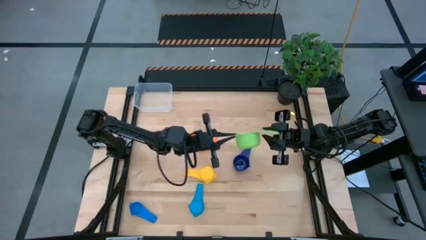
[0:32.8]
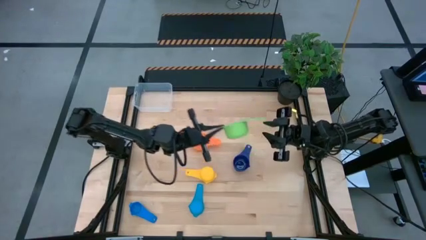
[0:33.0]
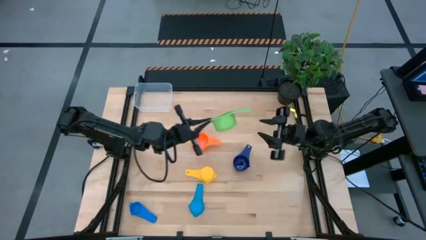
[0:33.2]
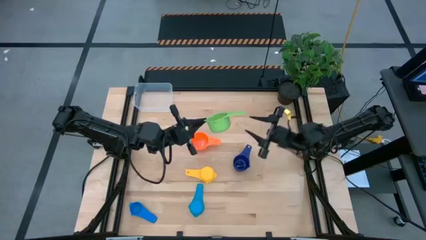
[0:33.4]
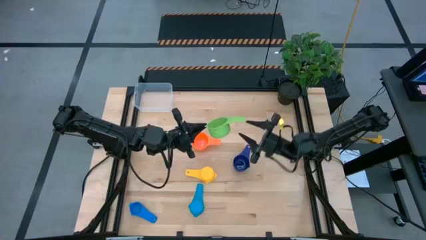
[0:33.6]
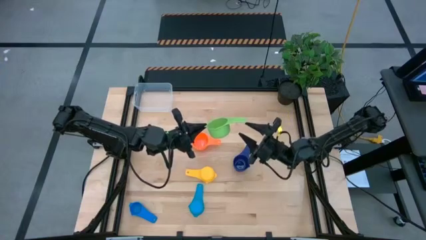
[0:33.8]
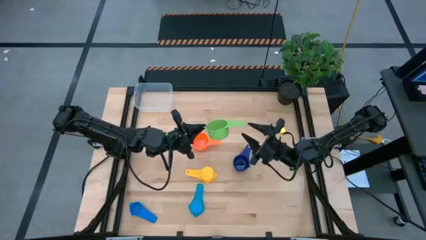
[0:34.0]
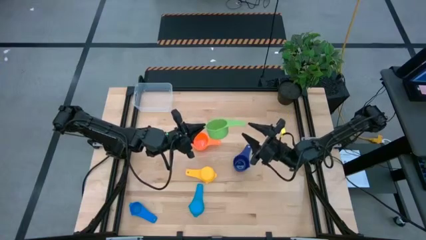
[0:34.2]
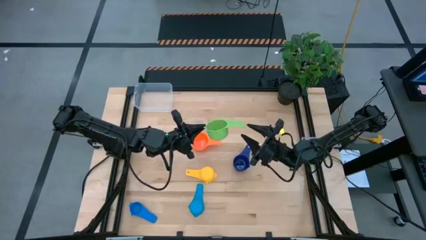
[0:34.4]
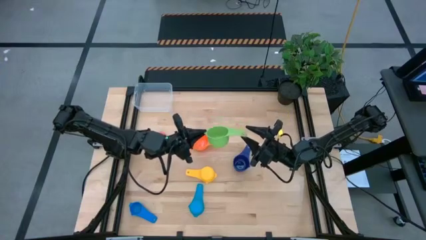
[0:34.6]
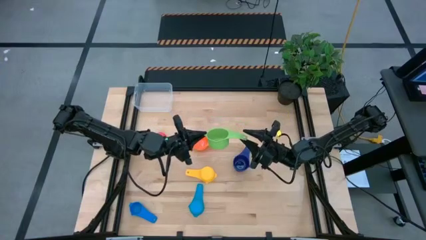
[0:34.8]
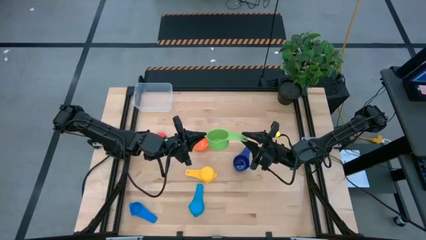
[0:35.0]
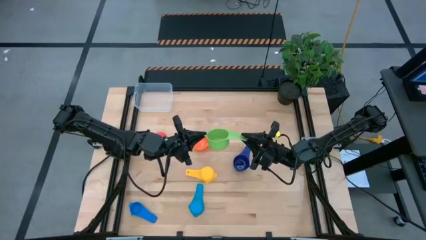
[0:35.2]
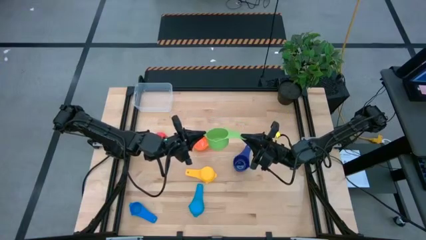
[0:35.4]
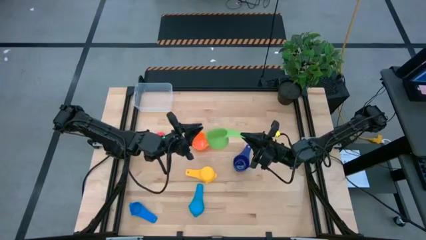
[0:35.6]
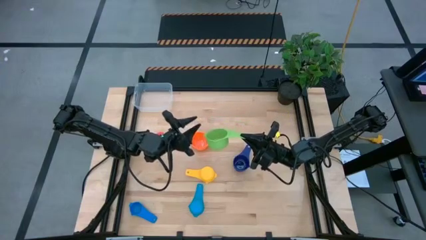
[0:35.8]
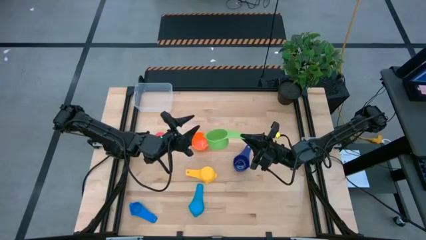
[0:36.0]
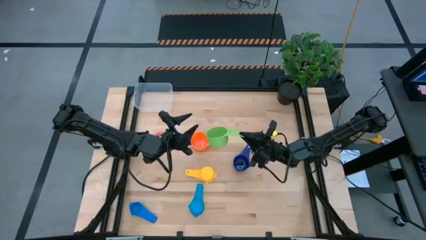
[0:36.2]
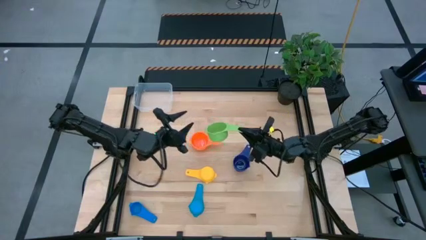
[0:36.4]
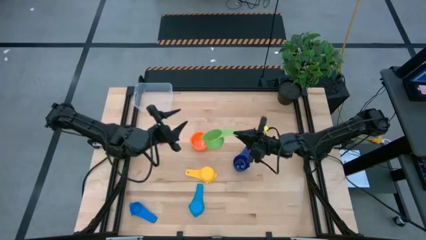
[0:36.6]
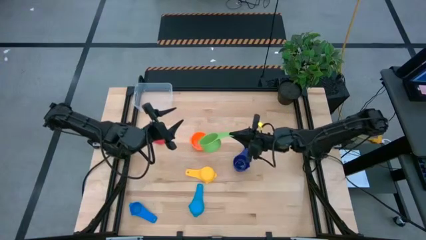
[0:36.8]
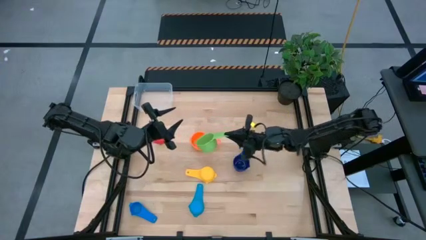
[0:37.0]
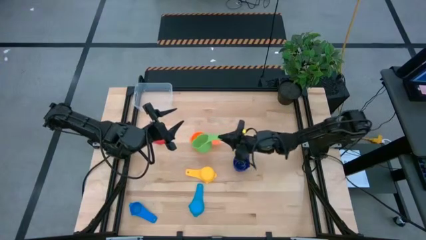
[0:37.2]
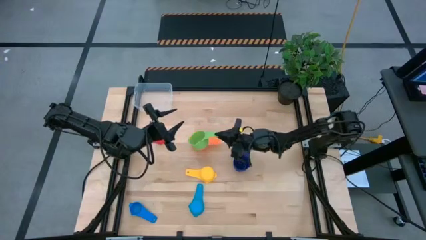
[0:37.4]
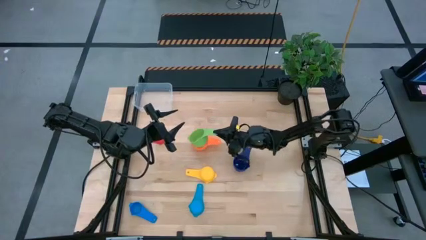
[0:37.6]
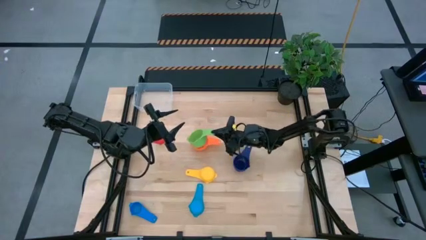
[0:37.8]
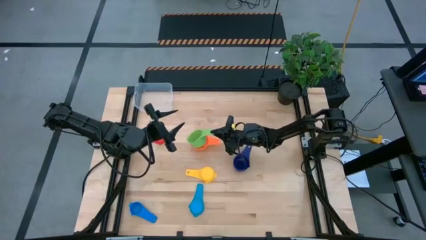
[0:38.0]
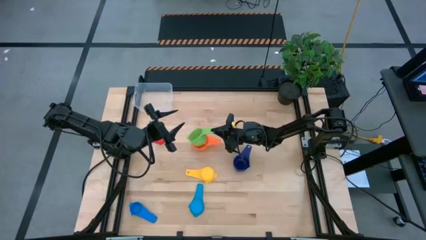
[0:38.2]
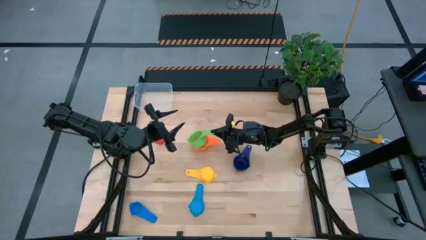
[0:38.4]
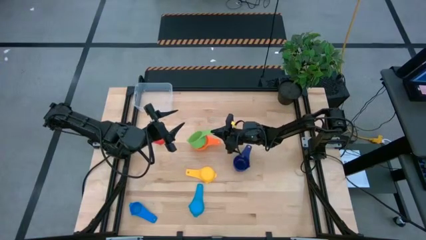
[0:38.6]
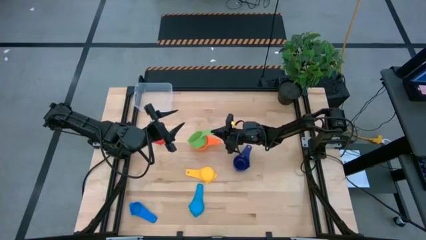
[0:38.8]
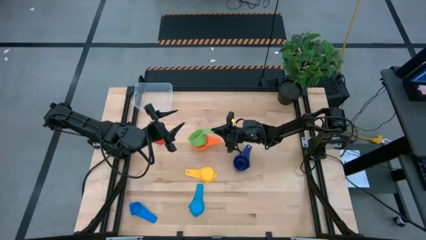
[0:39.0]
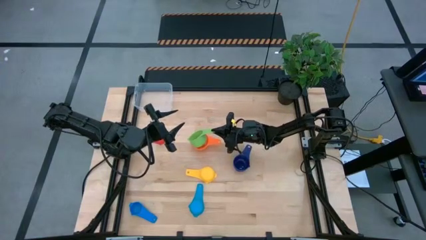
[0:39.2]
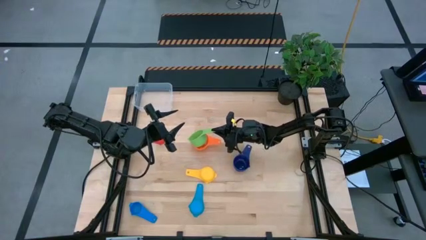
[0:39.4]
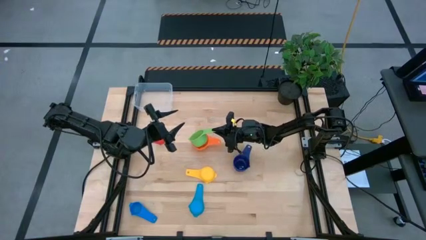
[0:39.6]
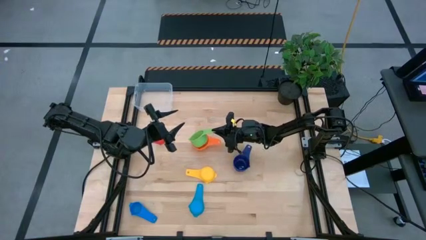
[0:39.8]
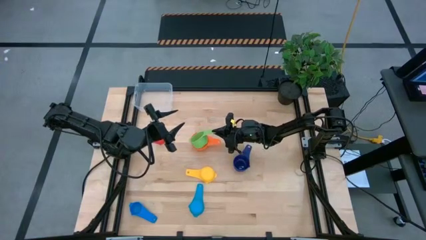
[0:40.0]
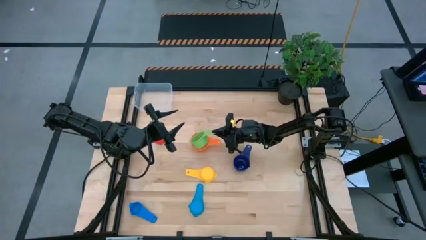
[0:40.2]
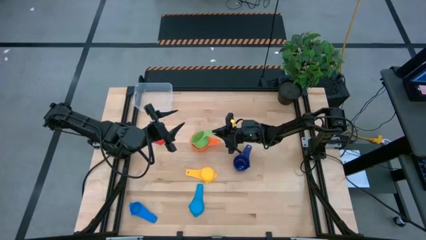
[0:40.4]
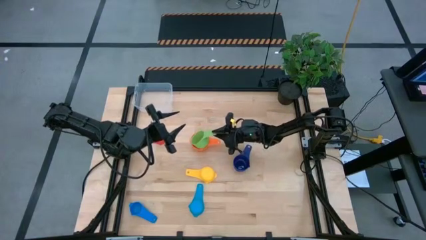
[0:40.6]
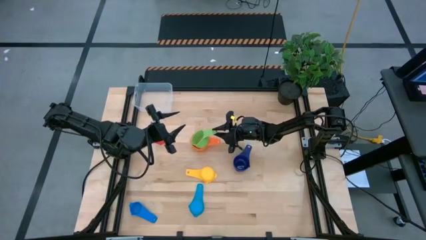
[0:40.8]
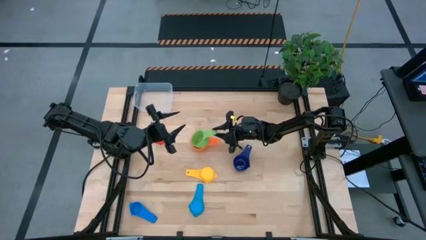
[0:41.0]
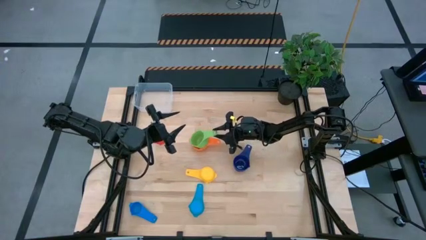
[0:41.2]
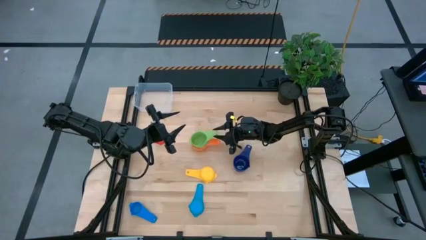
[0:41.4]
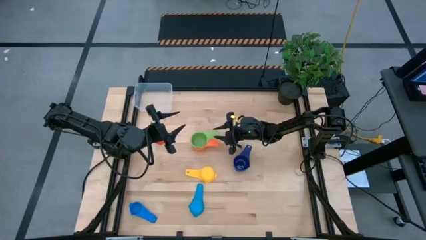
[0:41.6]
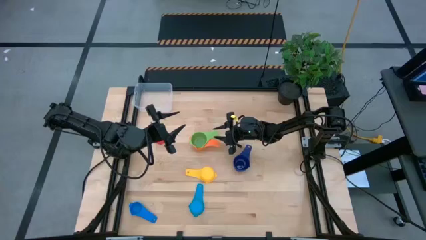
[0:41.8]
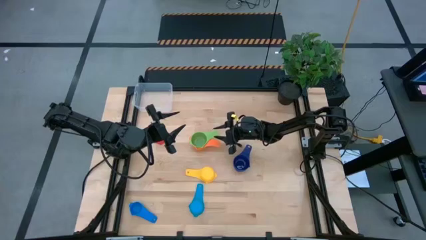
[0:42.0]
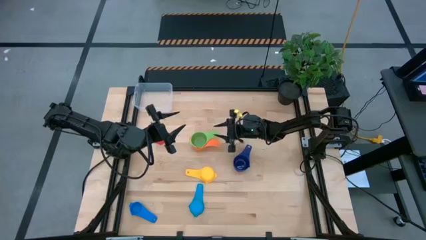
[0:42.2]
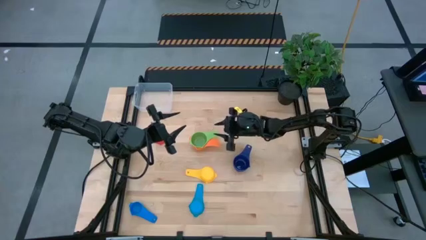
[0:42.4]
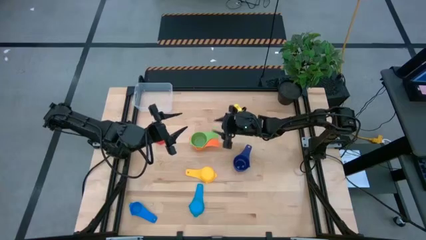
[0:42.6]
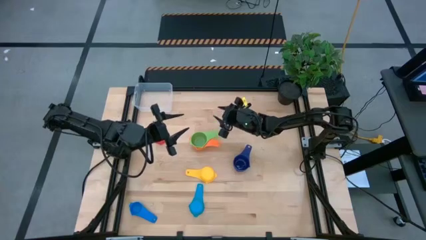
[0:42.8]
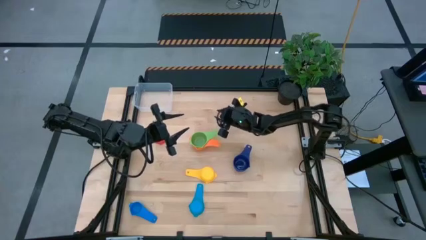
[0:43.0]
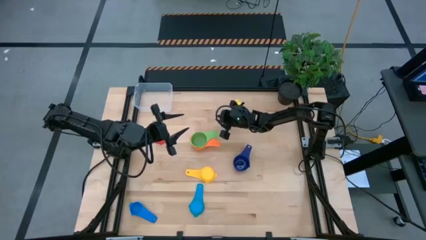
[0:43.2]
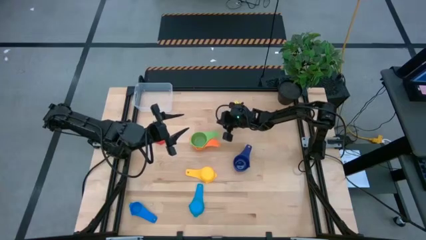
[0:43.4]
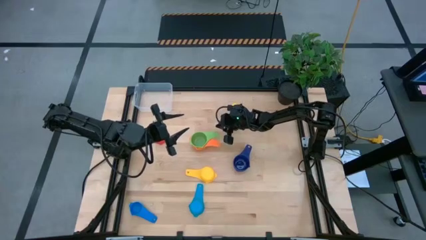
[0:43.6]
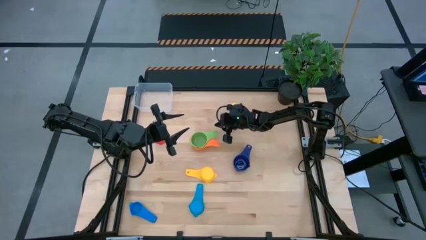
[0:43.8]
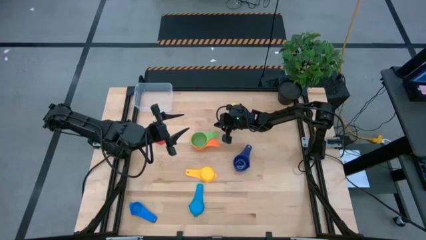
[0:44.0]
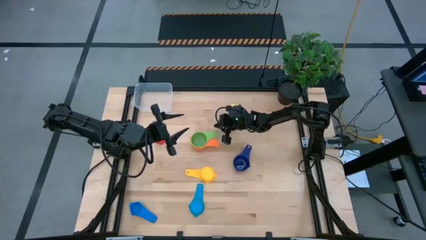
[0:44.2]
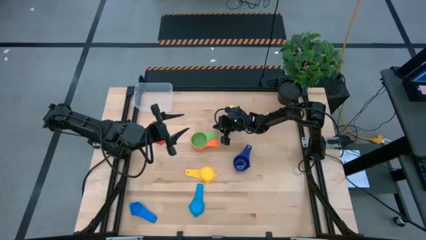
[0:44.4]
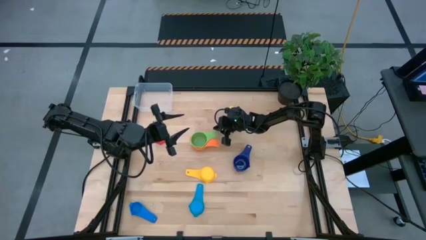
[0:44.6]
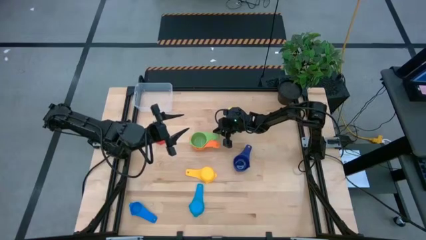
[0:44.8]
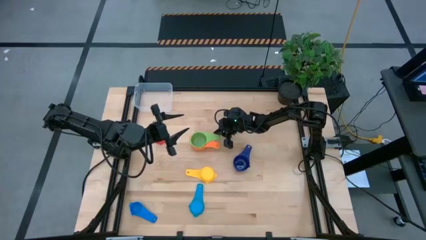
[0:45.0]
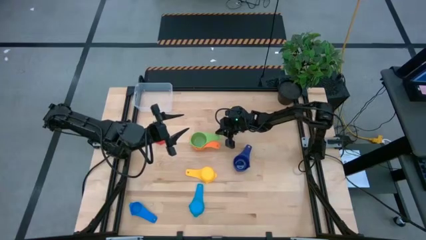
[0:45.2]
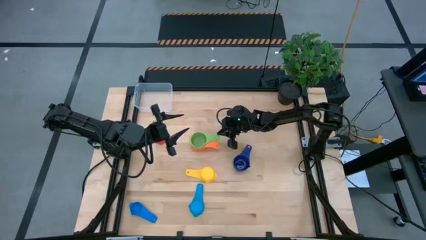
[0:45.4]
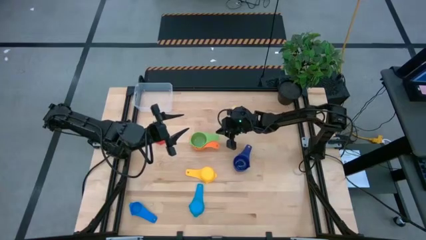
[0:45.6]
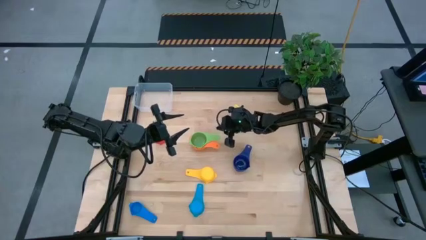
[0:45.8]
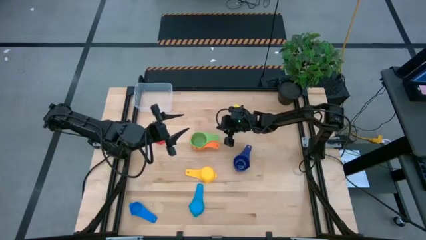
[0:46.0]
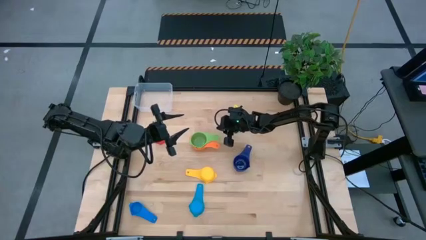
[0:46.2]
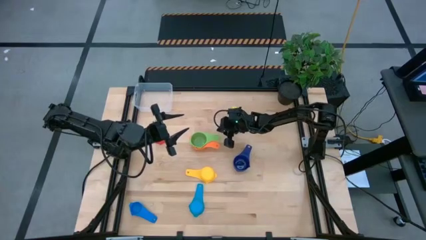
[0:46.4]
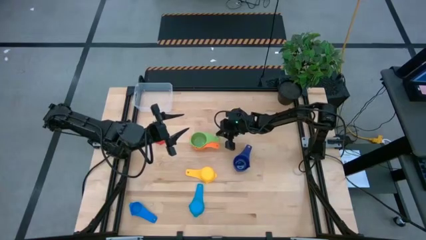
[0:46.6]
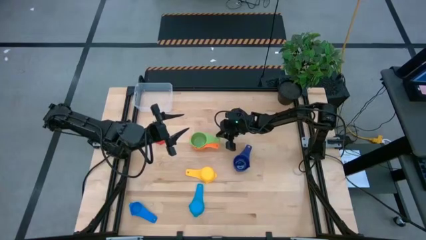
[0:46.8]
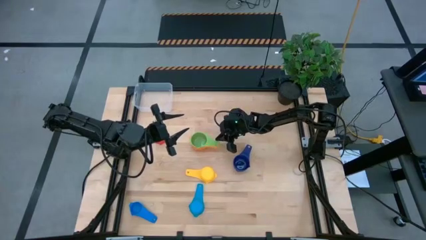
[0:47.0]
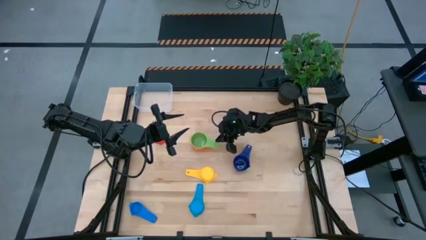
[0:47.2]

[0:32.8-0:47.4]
Task: Nest measuring cups in basket
Stack the green measuring cup on top of the orange measuring cup

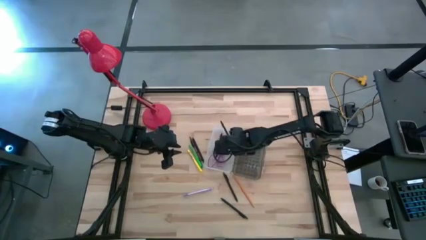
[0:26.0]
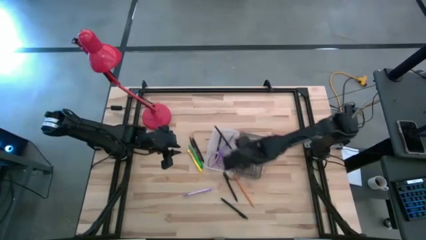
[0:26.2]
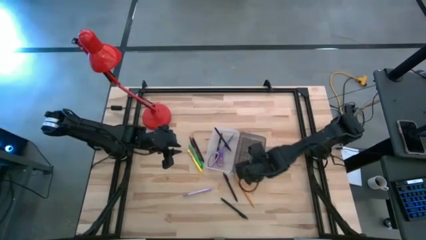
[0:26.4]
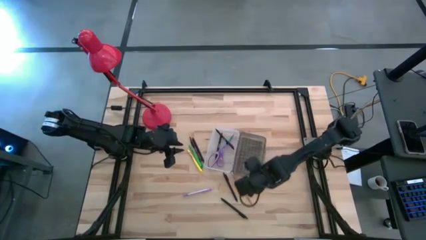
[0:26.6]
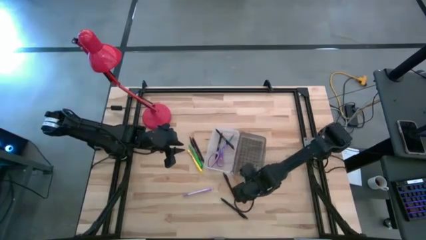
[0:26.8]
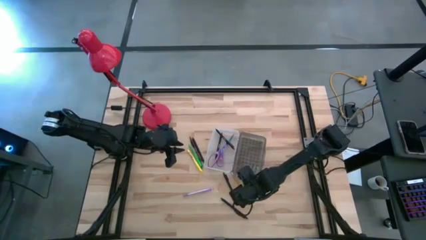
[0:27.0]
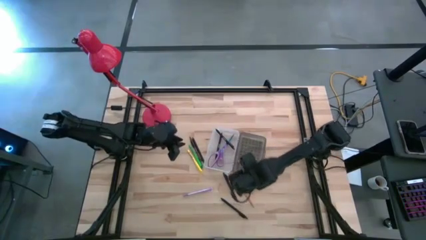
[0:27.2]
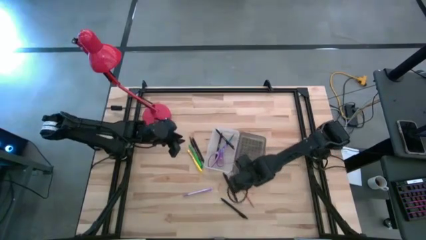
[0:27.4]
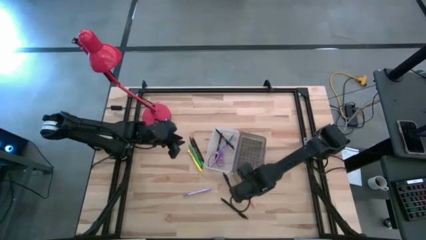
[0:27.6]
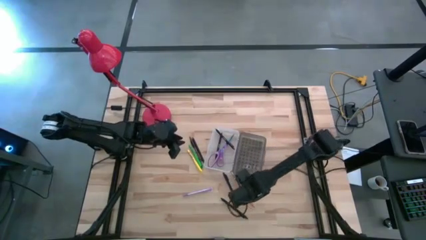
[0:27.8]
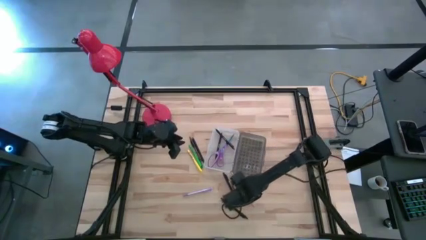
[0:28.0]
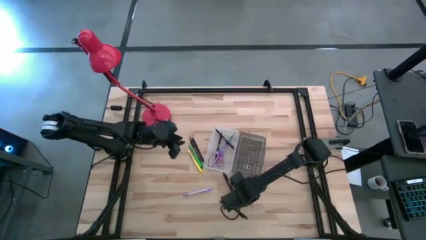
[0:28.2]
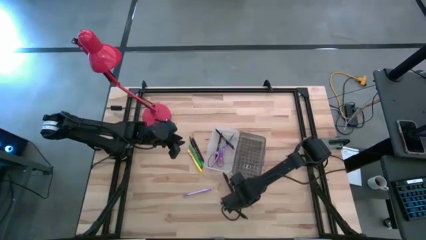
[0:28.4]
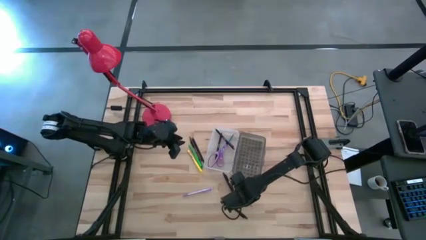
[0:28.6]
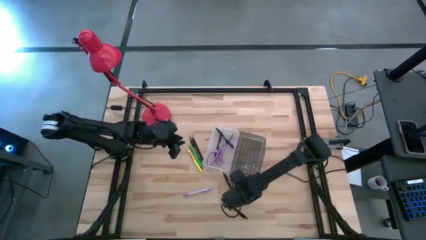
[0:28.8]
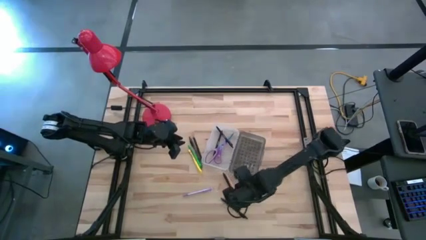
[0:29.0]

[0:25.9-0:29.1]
Task: Pick & place school supplies into a supply box
Put the orange pencil into the supply box
